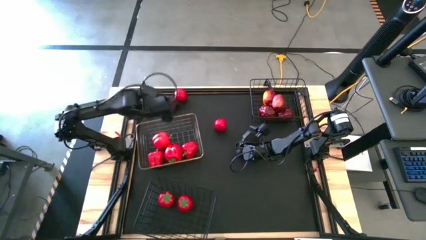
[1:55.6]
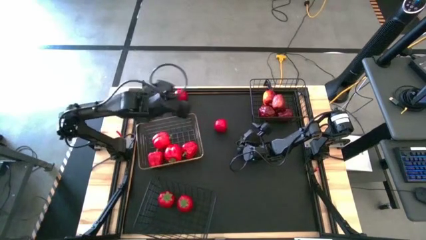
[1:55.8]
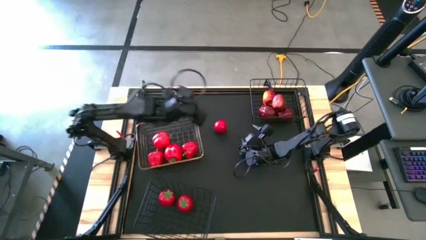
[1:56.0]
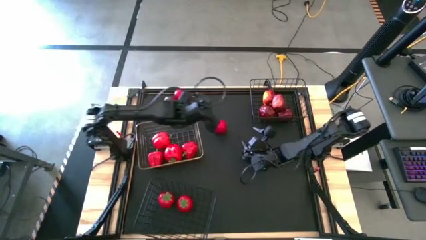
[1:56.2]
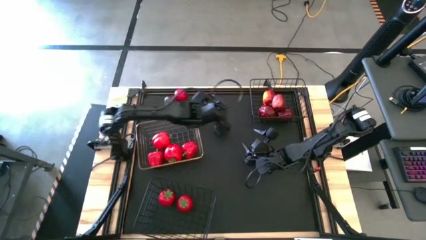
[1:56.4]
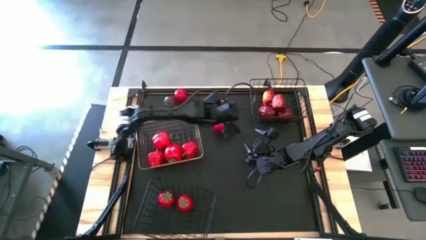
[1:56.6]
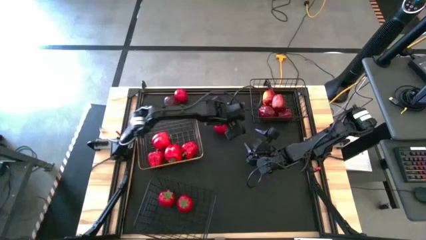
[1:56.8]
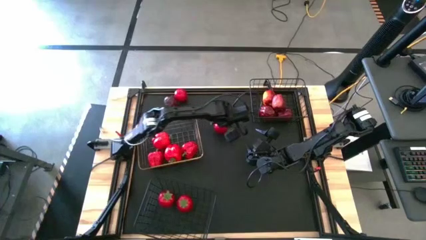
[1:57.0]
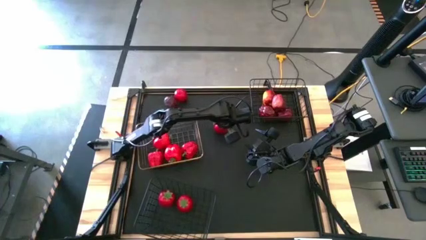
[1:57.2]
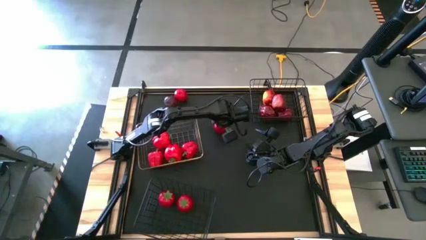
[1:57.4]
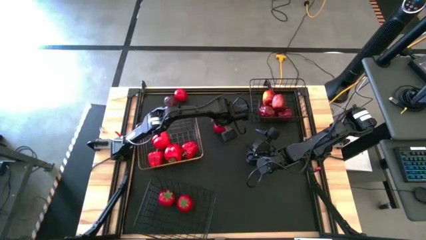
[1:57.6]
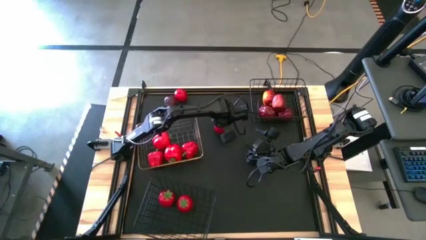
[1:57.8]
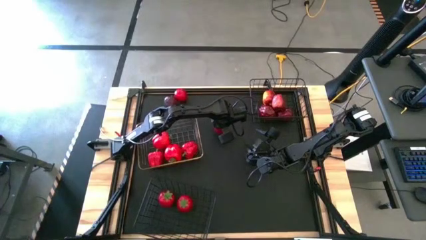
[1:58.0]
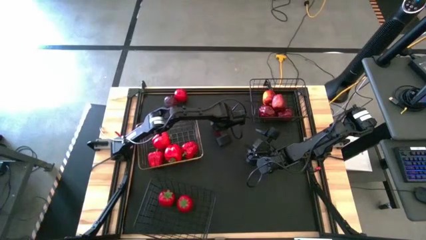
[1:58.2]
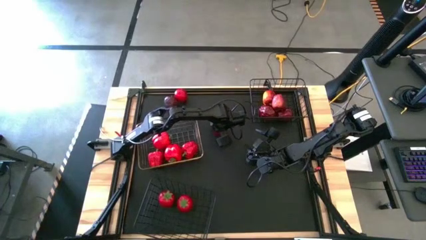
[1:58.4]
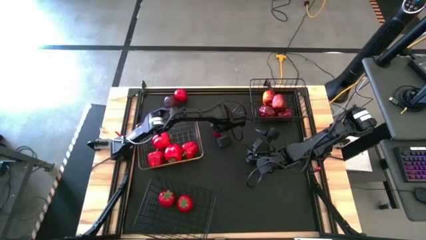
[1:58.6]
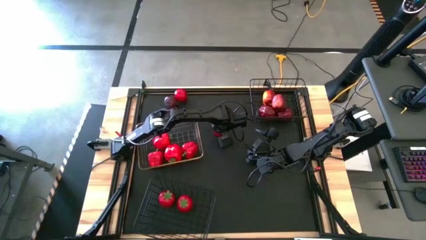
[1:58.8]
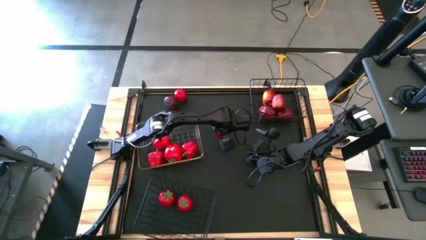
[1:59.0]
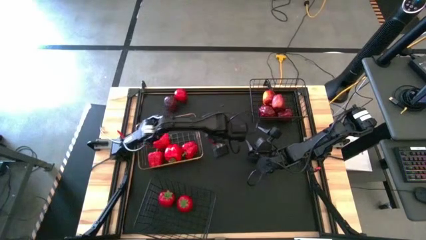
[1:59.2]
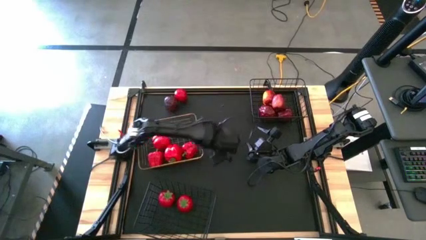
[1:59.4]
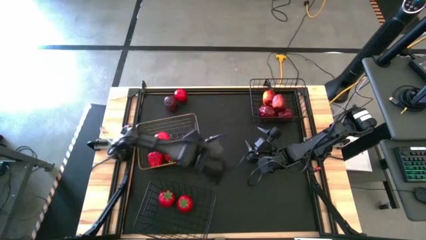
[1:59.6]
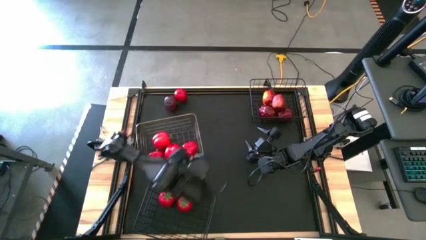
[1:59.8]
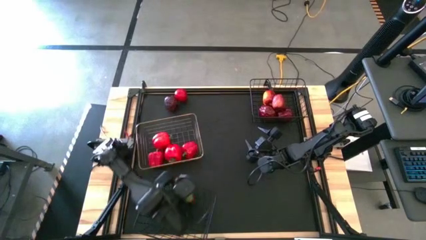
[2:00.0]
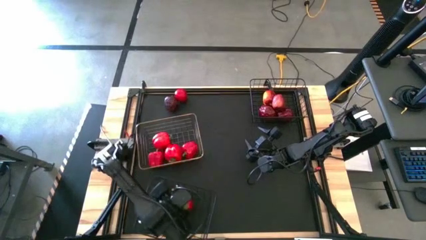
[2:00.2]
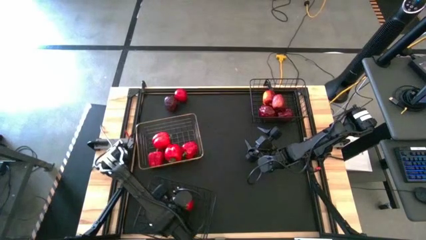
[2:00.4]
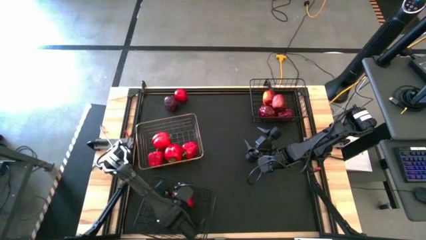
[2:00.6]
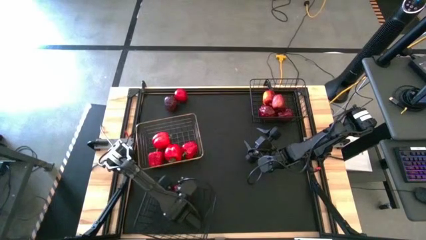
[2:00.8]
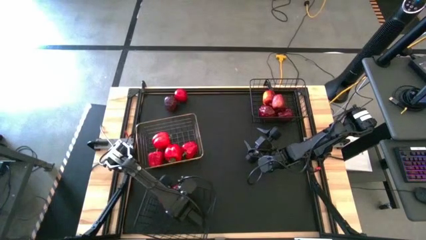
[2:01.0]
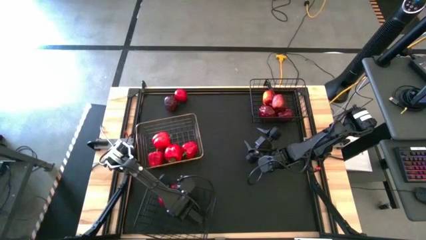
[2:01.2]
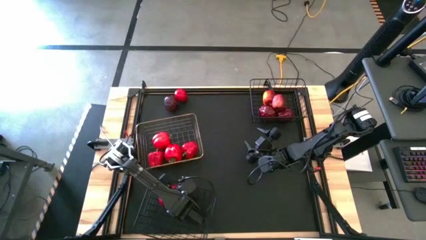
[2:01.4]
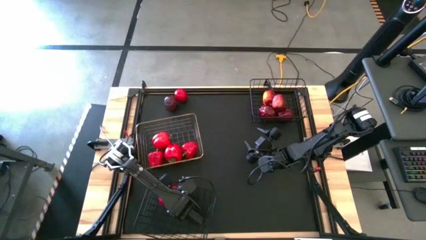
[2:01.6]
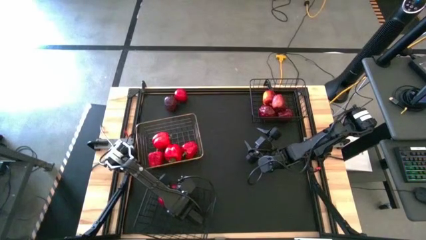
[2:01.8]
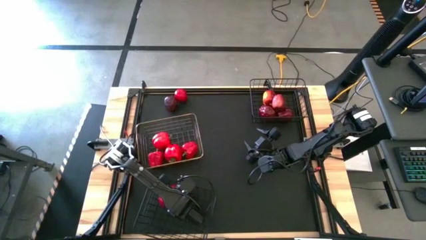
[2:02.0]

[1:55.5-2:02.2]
Task: Sort produce into baskets
Put the top center tomato into the left black basket

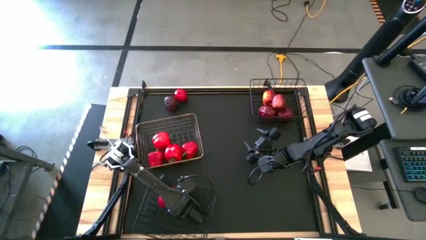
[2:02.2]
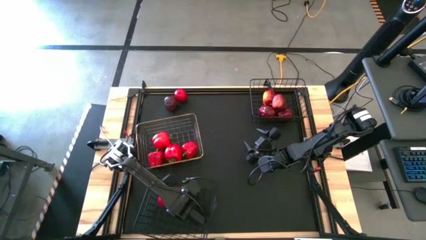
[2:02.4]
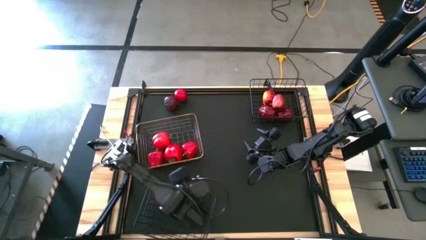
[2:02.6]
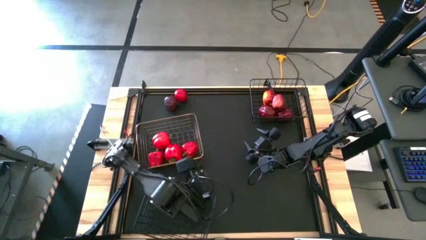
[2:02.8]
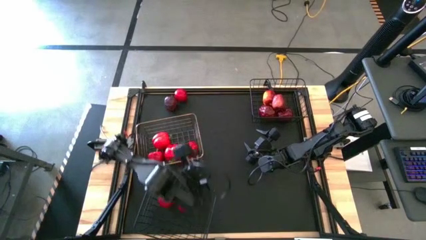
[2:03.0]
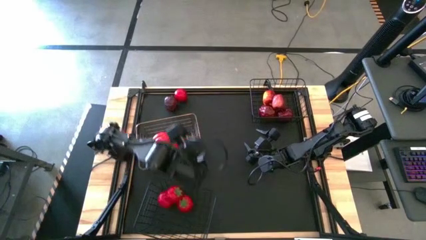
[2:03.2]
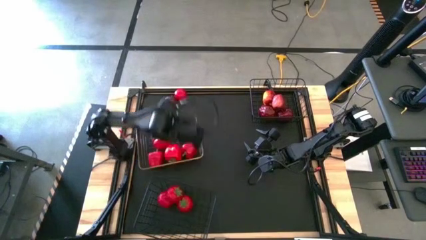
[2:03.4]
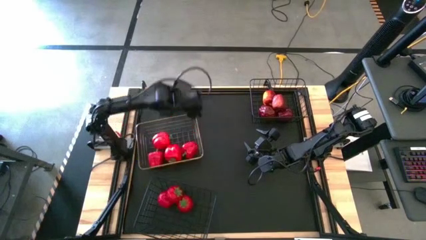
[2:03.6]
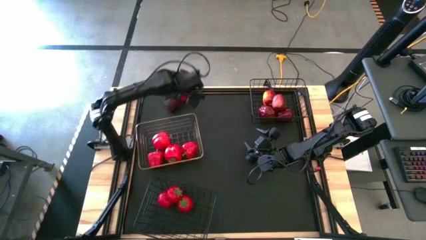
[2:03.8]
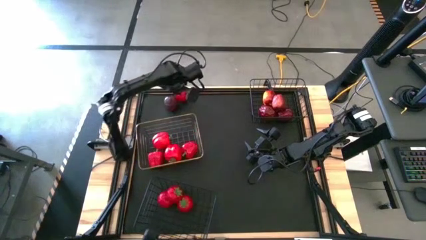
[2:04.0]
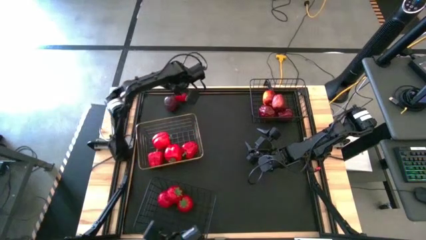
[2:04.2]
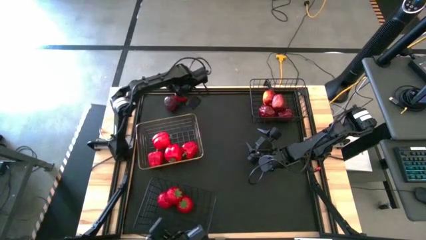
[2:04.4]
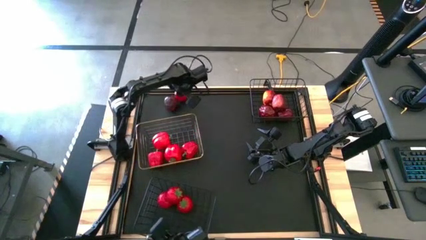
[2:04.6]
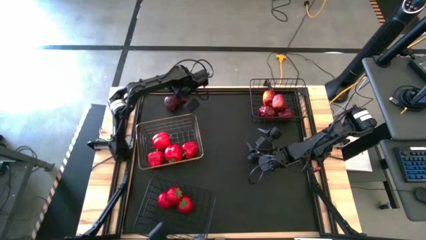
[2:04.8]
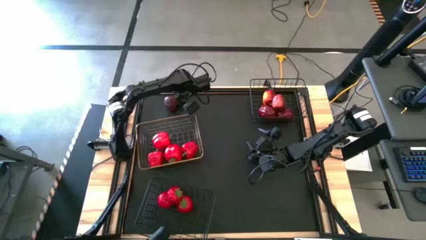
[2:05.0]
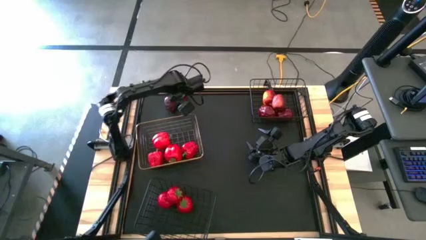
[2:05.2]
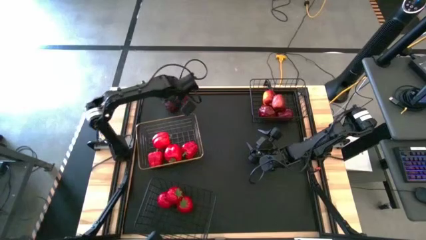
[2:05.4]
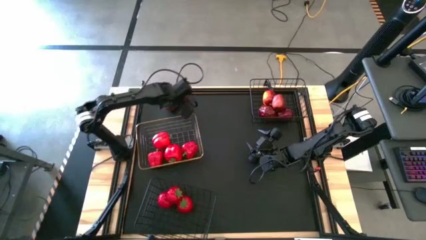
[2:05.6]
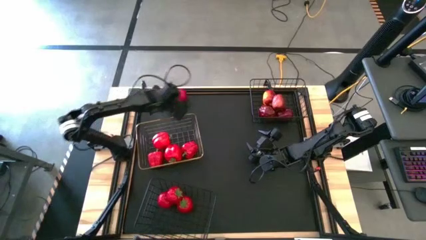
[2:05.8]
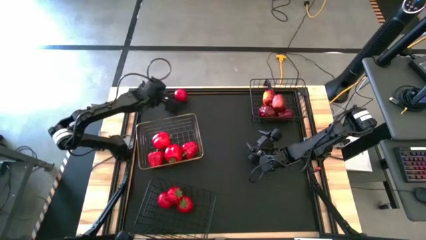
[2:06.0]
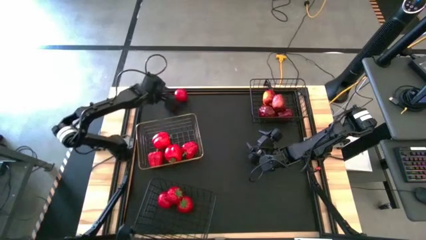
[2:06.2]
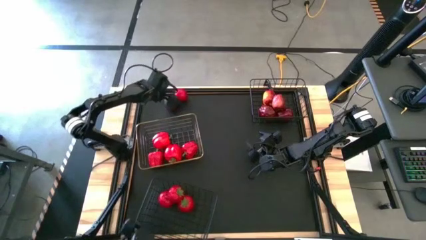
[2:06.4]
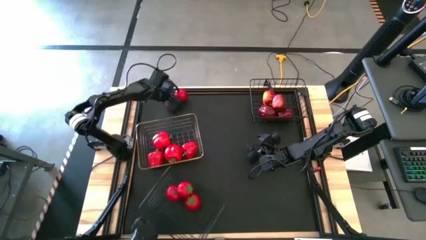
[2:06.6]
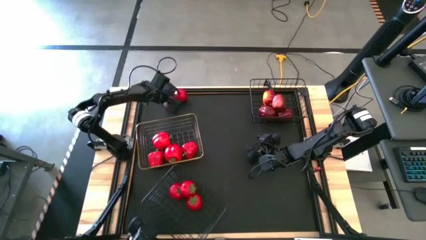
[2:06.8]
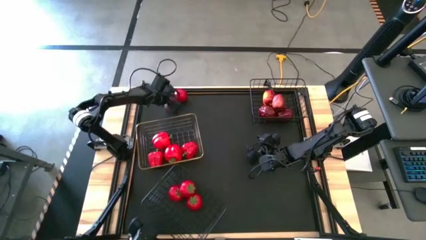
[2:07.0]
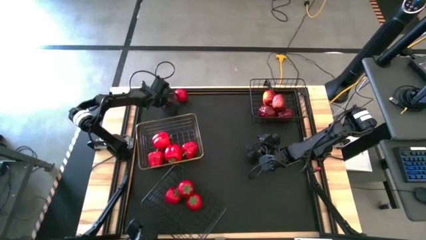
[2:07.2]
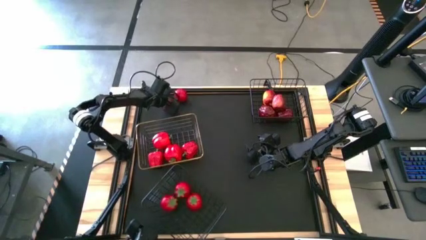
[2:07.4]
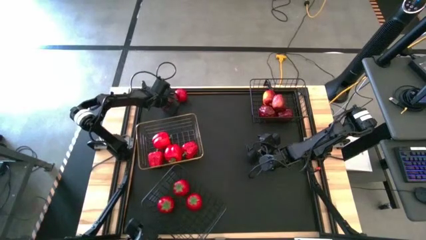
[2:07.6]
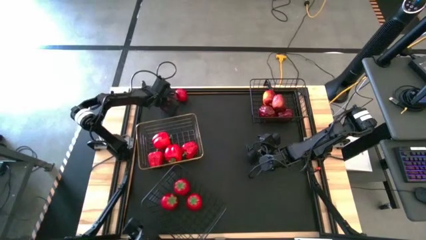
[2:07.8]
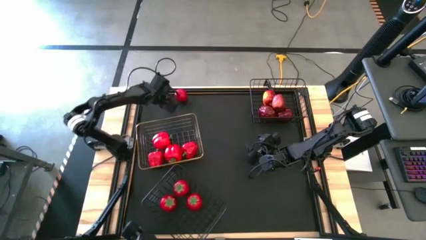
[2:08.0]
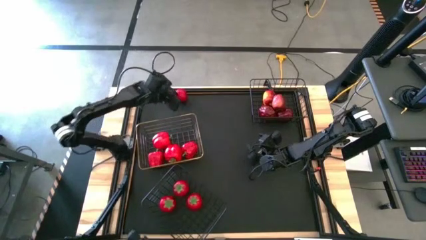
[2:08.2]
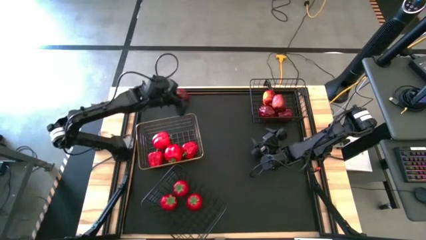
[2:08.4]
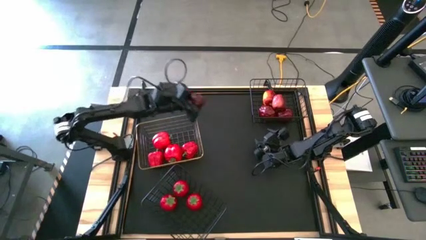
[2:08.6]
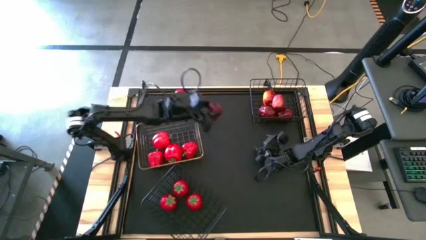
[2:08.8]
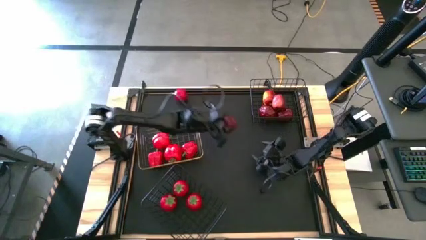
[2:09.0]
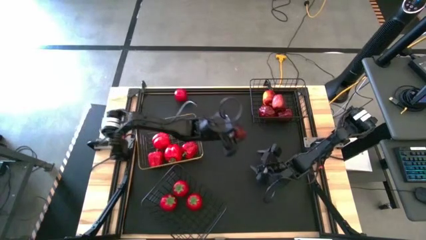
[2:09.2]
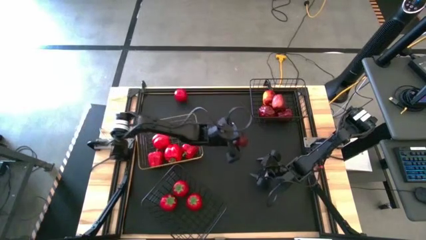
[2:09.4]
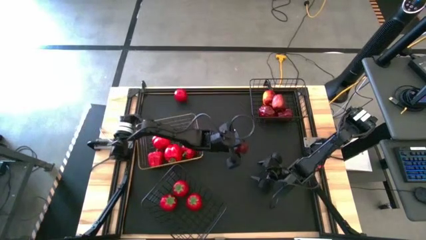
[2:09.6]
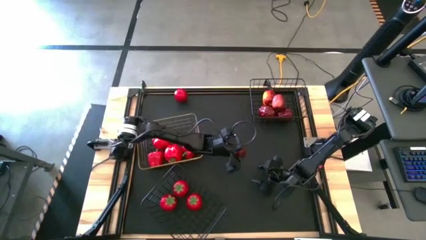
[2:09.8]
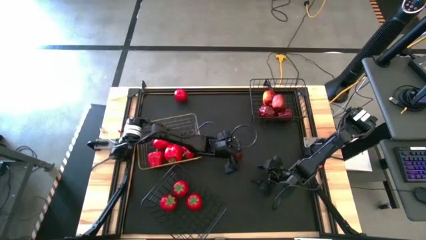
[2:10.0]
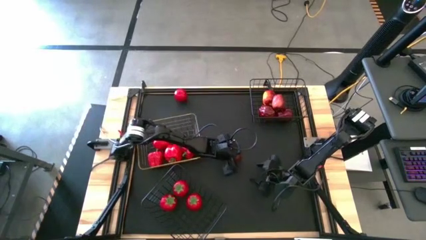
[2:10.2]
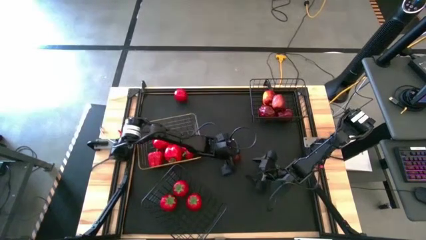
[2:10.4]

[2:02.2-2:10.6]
Move the red apple from the top left to the top center of the table

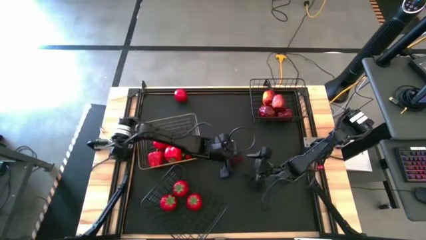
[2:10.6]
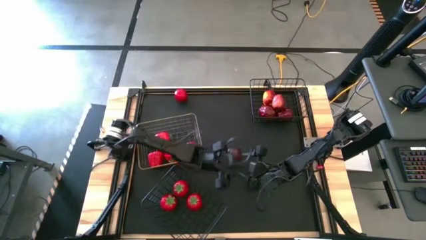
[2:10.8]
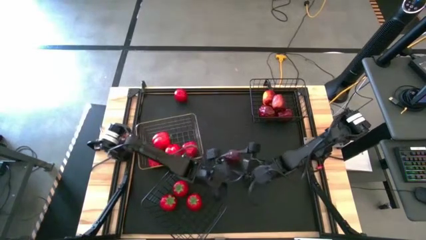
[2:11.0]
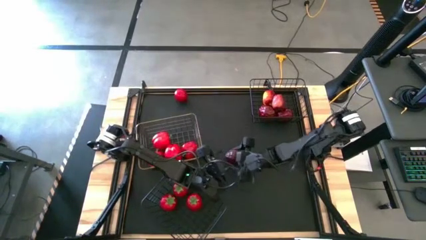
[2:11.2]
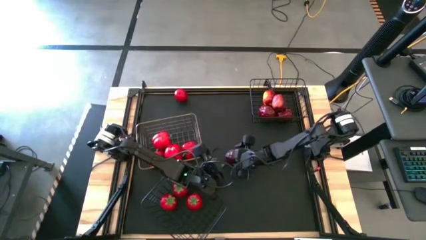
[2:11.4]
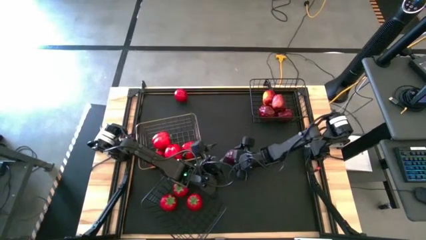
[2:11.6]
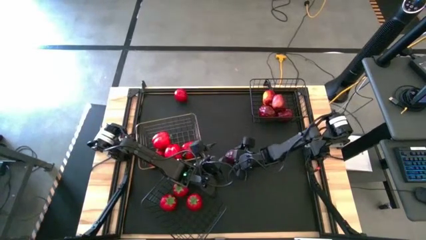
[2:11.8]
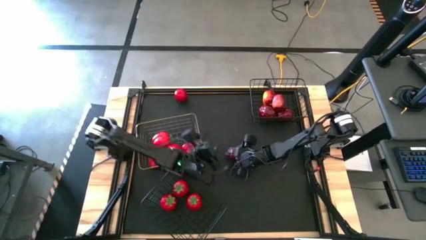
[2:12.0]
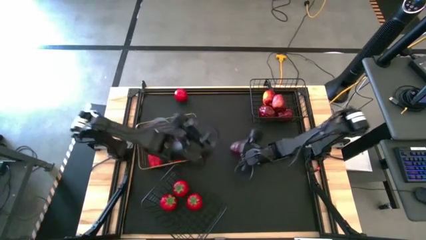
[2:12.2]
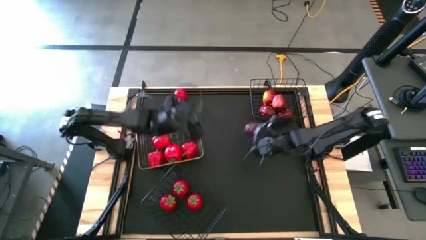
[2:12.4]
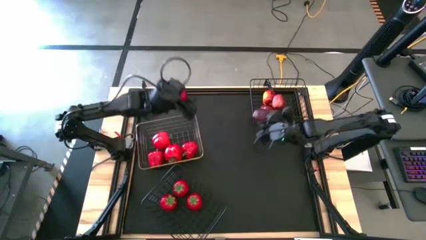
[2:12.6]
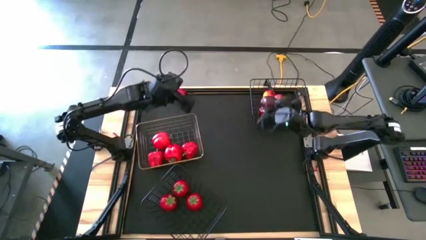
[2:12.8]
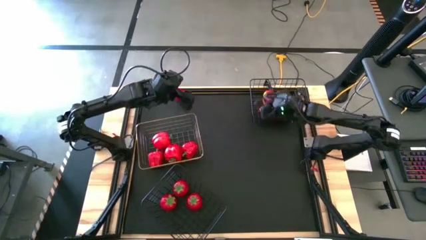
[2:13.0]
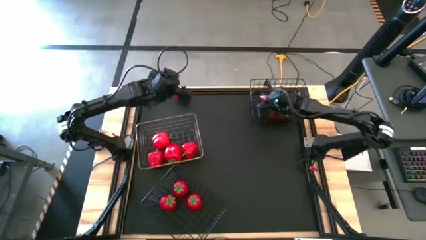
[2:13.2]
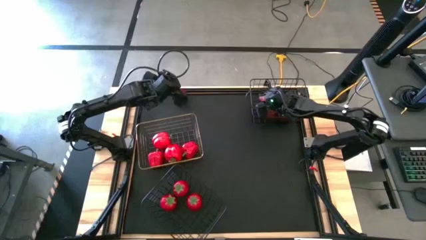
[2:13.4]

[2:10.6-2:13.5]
Put the red apple into the right black basket
